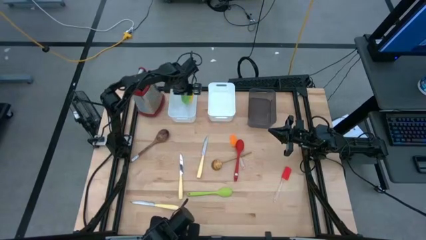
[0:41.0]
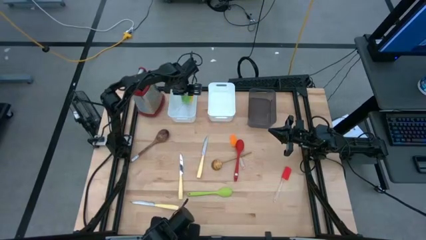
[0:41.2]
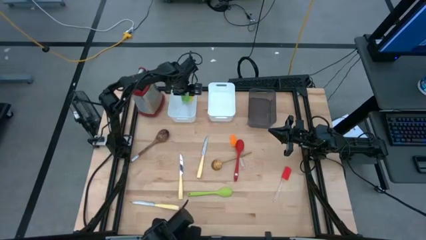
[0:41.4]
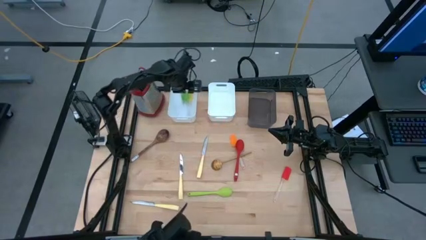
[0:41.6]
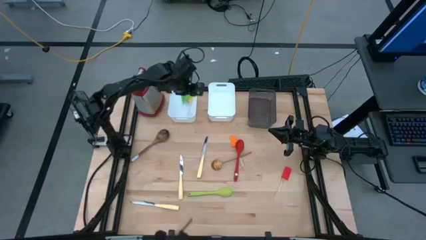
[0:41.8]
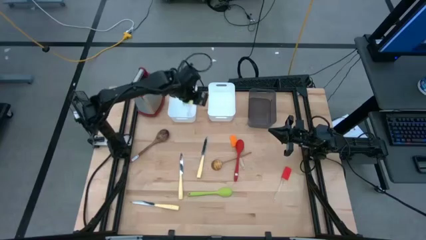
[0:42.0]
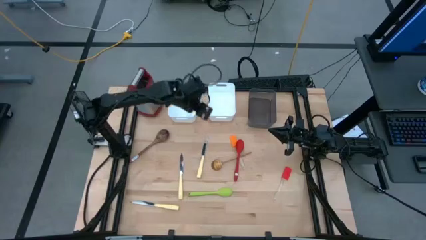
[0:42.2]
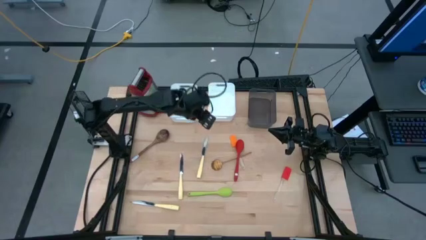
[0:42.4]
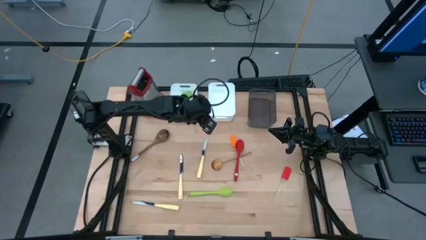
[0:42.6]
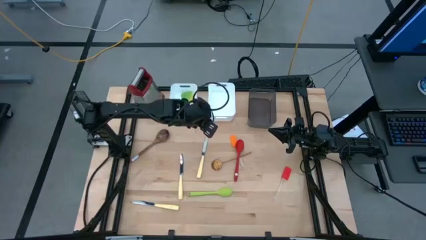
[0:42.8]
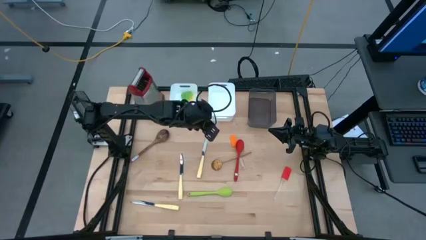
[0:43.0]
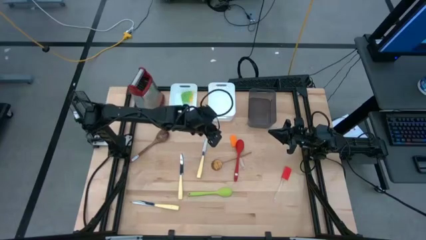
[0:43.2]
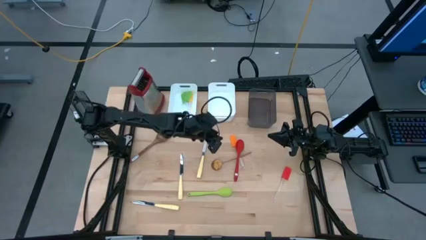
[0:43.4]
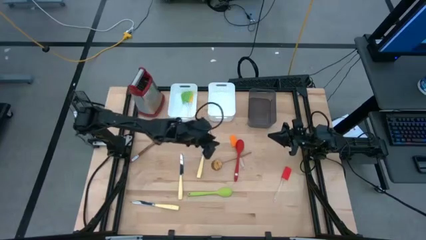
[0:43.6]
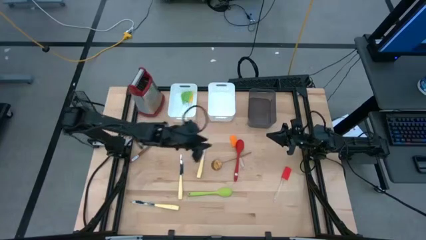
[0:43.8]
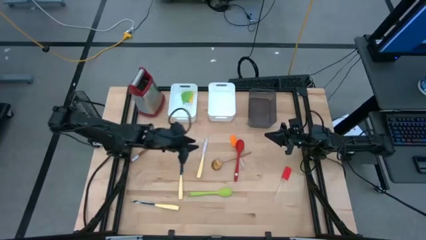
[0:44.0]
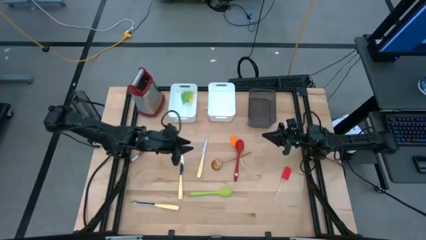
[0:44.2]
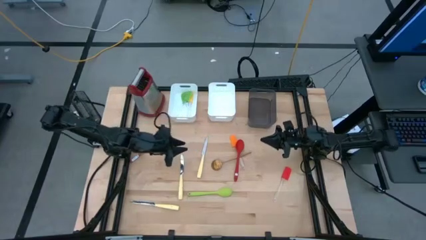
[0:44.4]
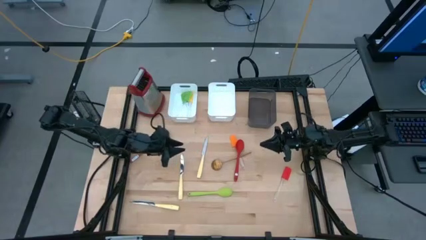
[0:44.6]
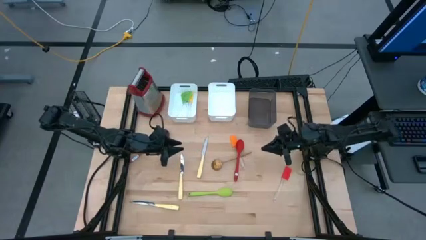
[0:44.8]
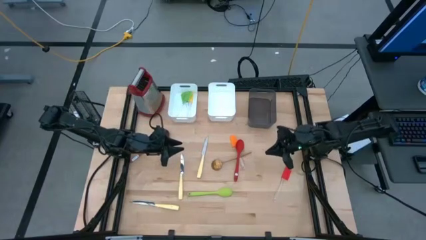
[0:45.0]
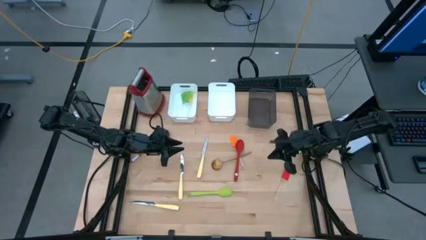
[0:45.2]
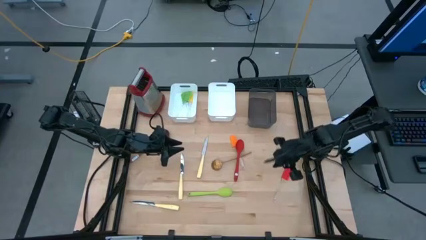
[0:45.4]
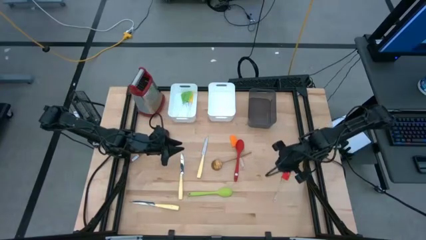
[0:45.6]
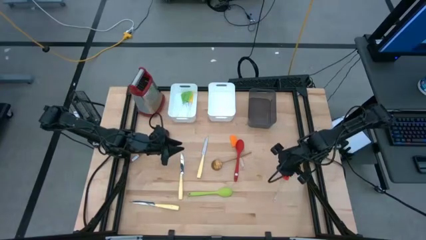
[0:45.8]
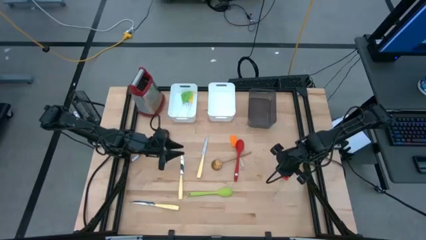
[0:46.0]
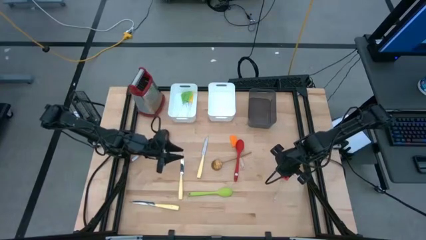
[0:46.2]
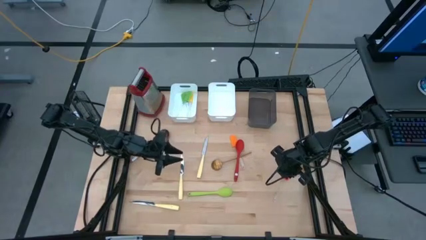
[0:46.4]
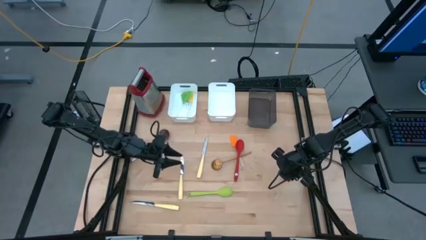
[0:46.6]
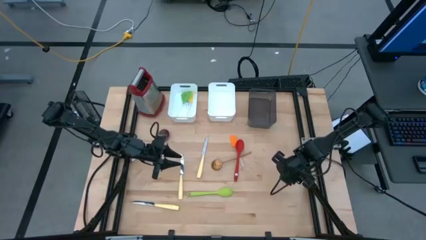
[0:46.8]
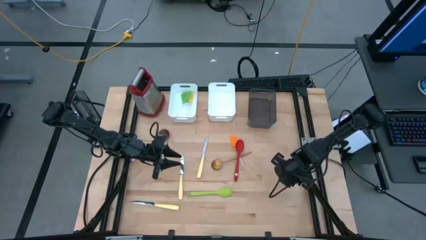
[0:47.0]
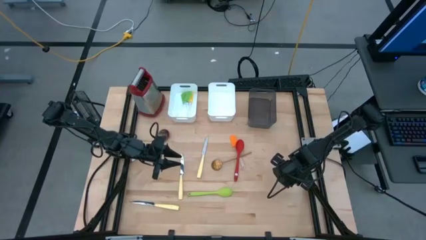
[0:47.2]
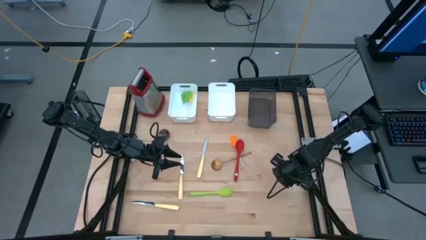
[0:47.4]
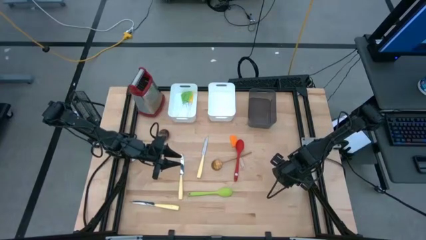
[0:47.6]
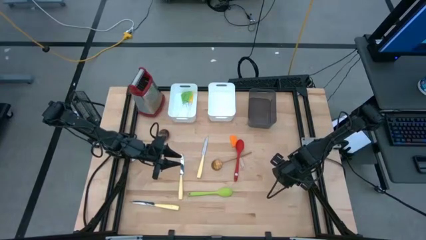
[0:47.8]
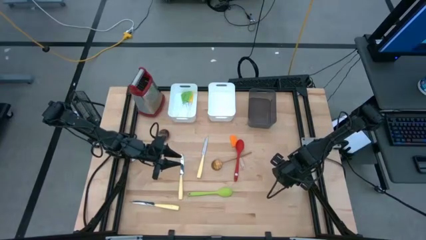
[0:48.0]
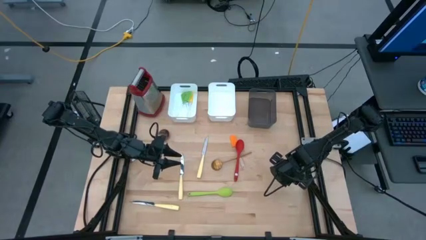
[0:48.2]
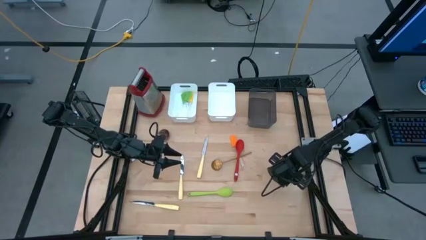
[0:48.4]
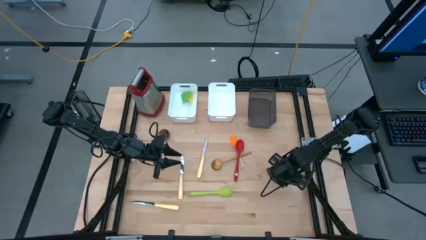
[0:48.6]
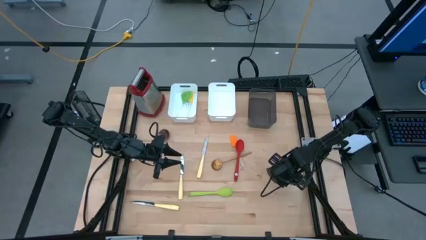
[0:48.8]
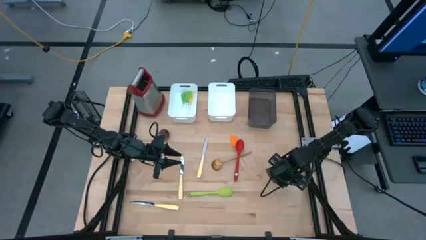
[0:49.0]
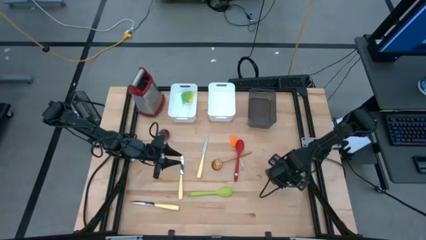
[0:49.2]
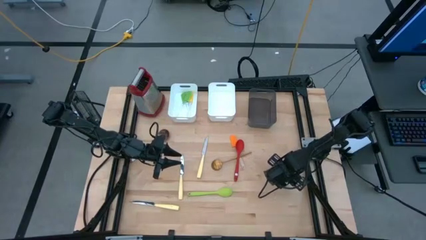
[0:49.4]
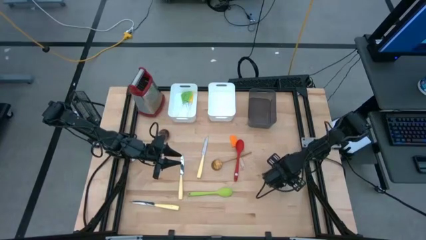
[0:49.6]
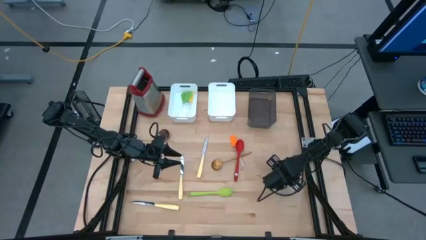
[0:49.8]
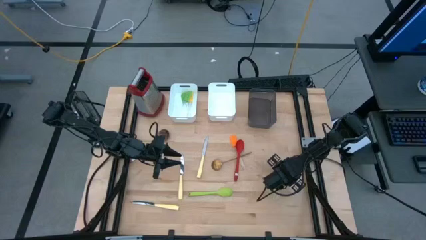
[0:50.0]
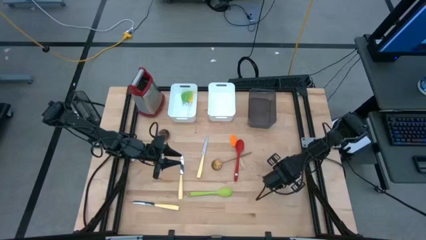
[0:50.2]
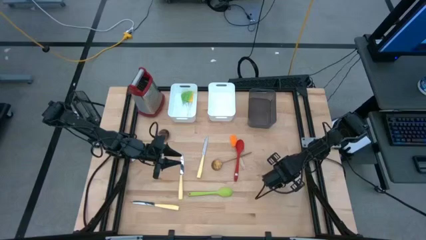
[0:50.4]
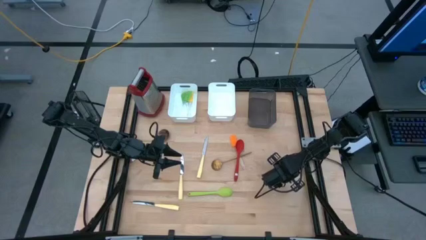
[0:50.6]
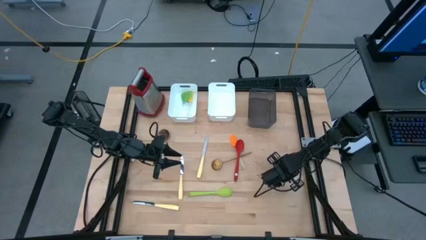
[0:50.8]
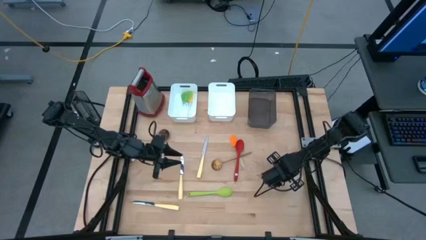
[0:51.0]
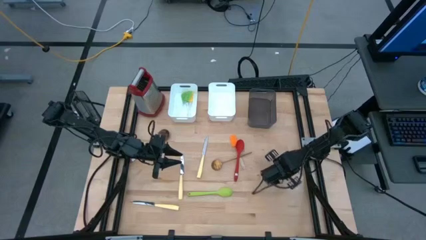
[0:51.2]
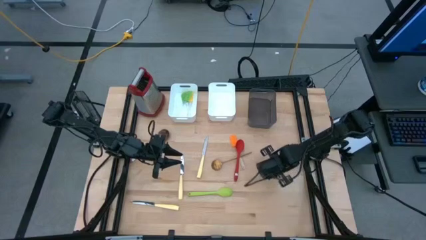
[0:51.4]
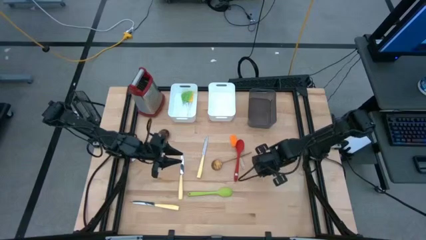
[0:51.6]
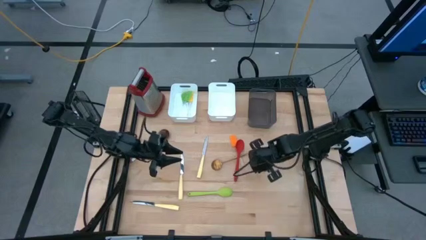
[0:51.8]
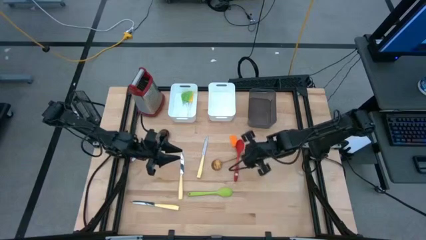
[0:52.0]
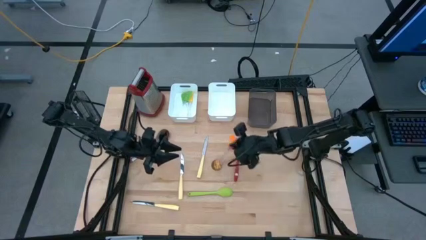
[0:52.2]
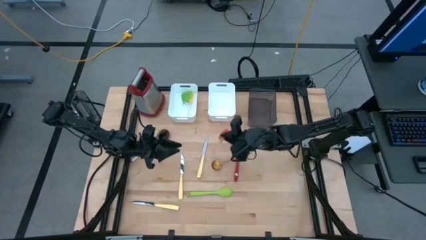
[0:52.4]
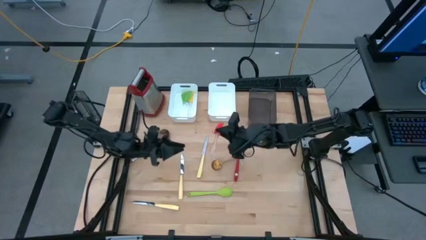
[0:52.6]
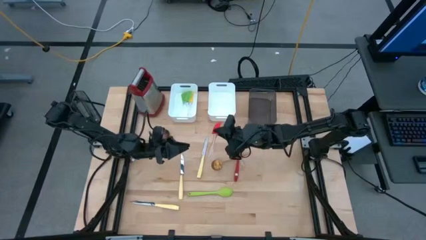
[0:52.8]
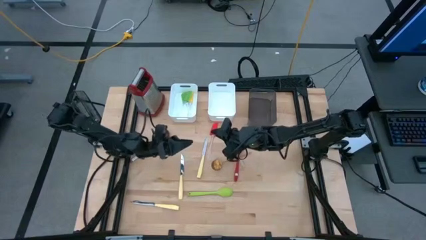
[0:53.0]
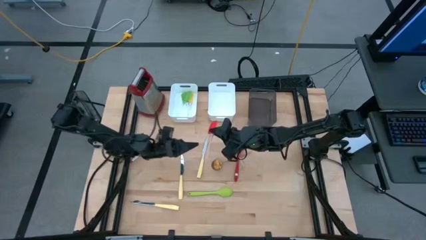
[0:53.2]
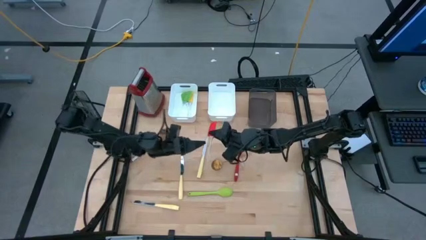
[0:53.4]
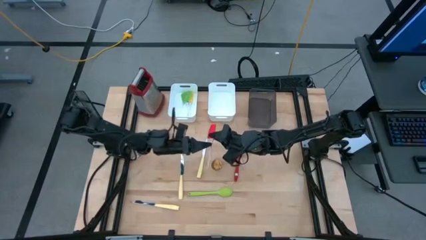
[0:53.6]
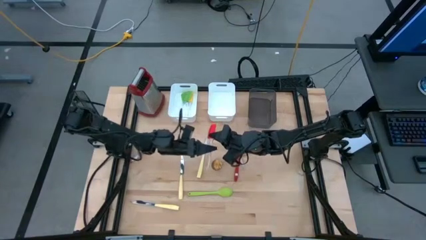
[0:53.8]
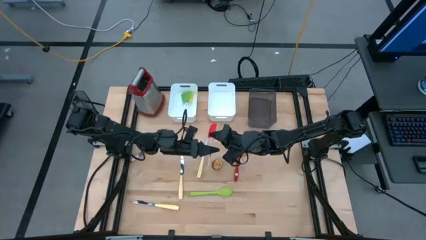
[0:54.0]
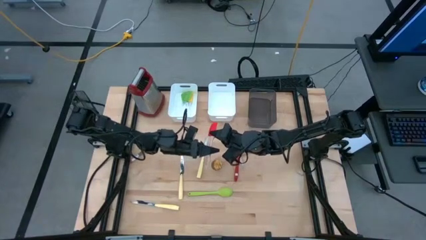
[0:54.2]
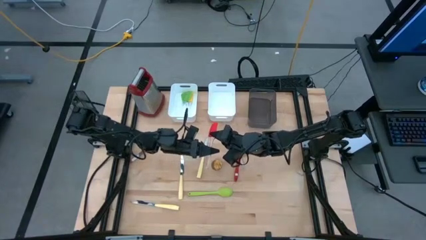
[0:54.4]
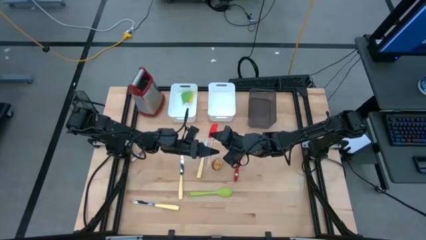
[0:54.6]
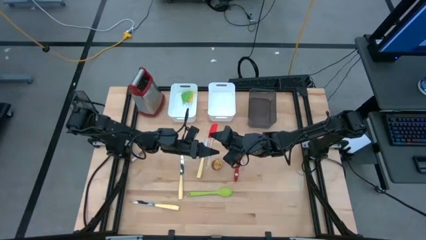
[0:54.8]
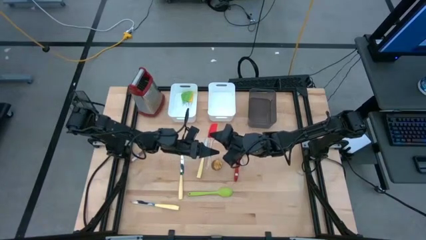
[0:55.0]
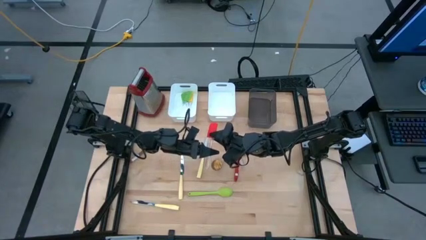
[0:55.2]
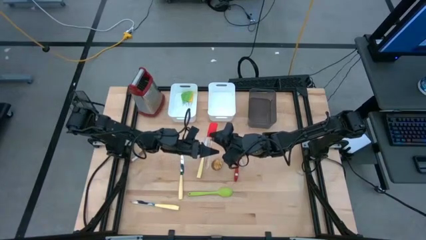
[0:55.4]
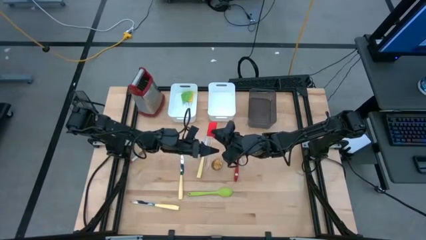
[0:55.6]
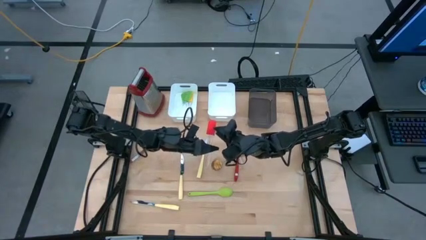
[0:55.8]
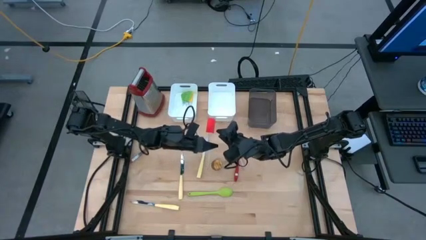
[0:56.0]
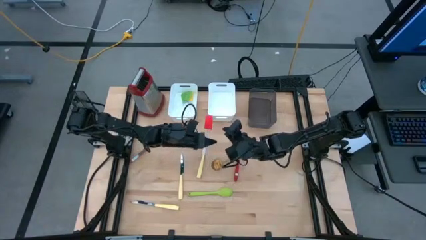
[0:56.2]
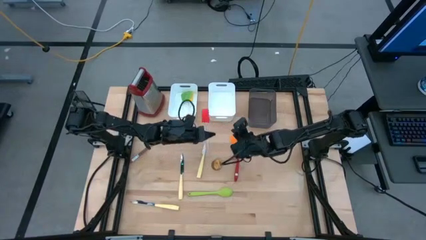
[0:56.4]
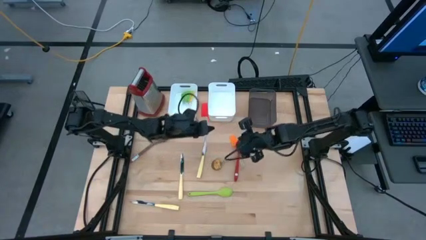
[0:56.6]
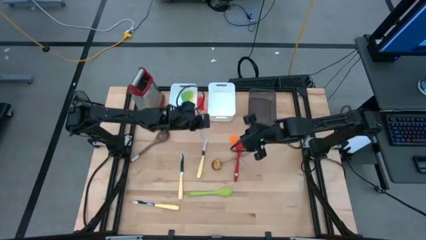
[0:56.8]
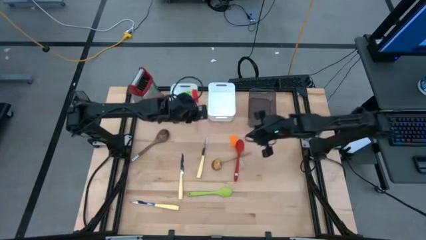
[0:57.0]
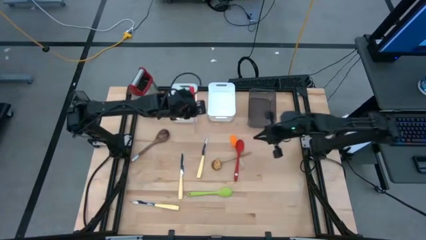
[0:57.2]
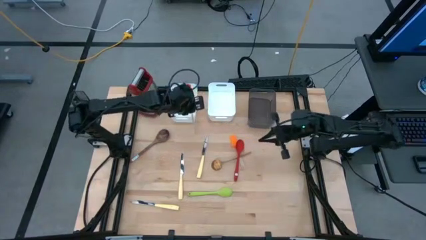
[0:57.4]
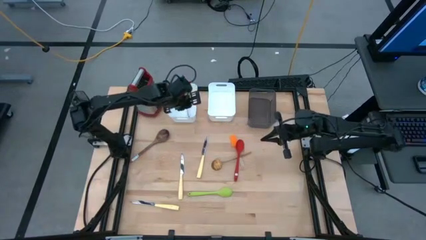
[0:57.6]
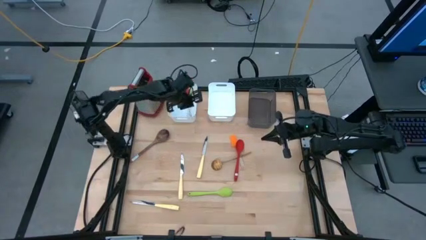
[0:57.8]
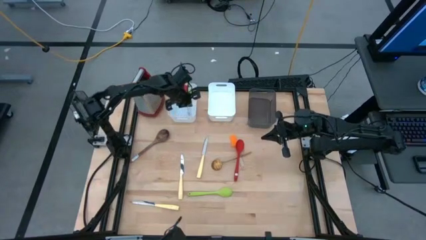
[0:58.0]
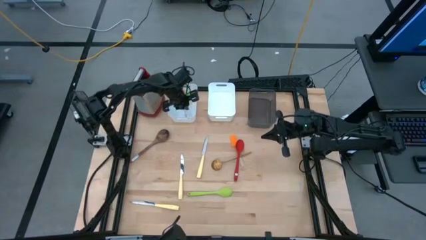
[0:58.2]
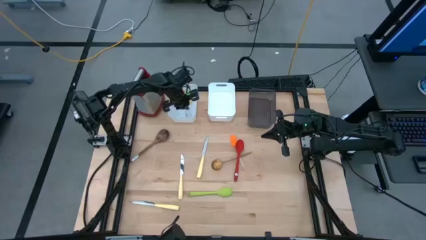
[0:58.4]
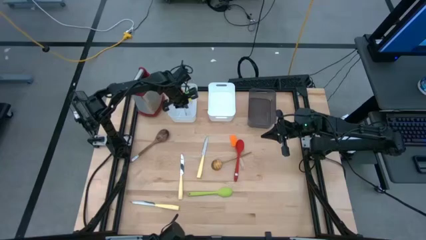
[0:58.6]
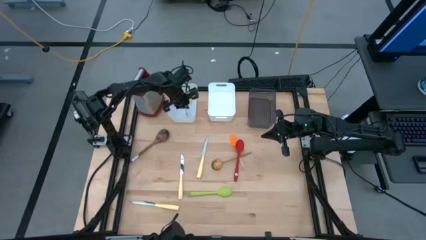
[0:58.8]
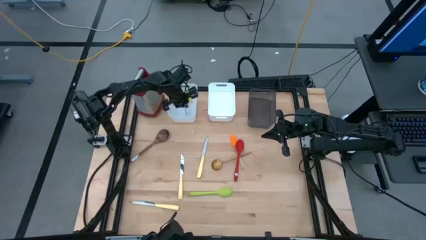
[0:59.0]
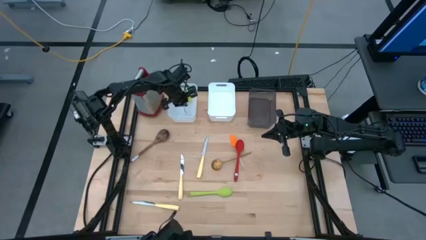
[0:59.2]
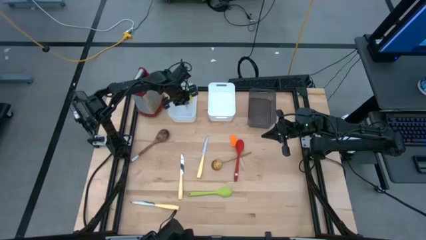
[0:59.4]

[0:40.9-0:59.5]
Task: Pick & Place Kitchen Items
Put the red spatula into the left white bin
